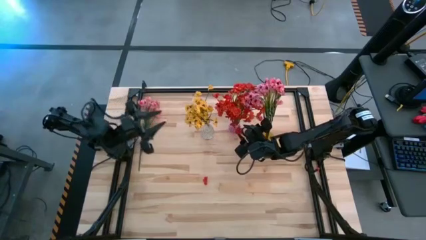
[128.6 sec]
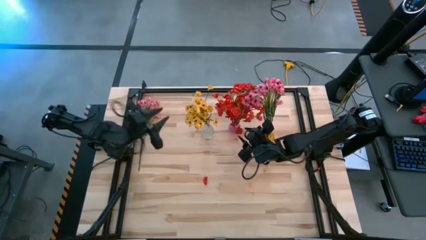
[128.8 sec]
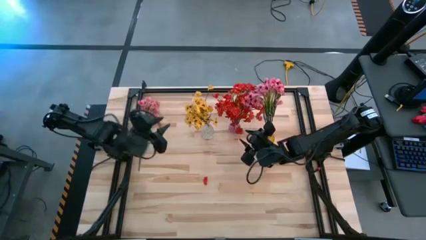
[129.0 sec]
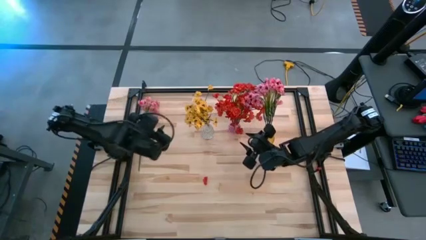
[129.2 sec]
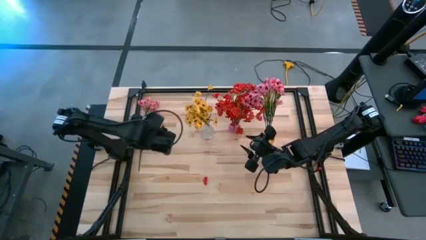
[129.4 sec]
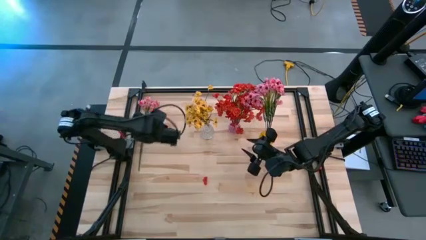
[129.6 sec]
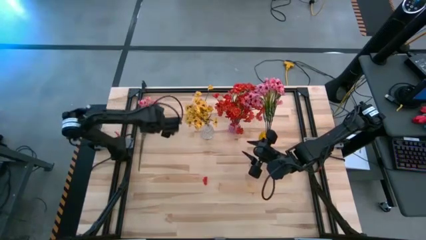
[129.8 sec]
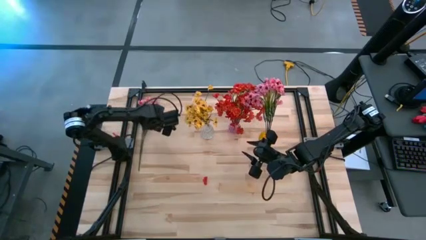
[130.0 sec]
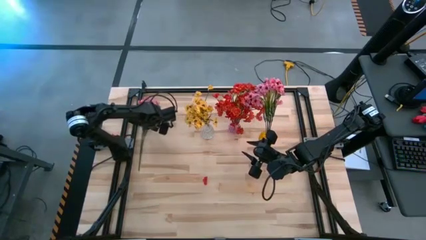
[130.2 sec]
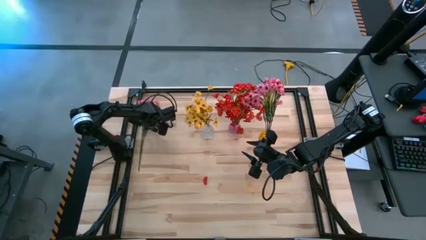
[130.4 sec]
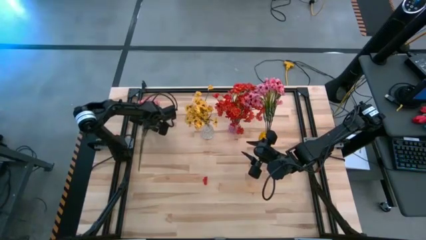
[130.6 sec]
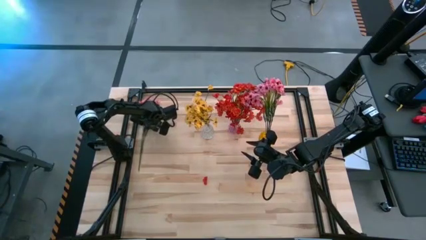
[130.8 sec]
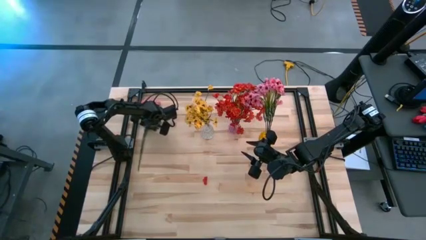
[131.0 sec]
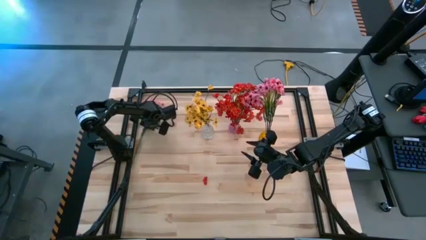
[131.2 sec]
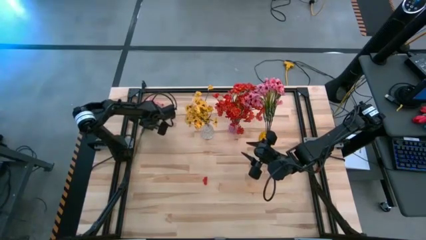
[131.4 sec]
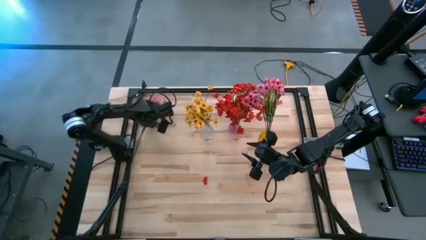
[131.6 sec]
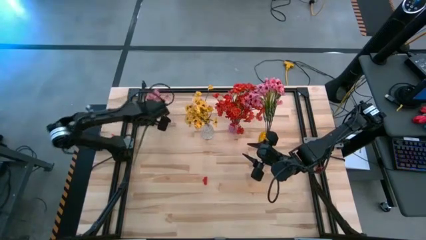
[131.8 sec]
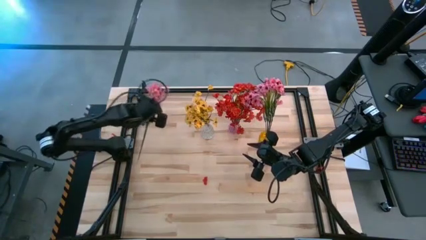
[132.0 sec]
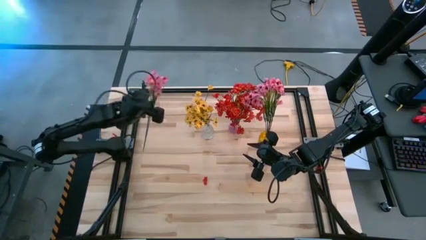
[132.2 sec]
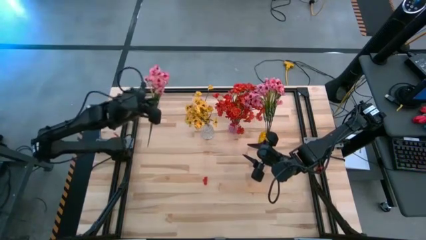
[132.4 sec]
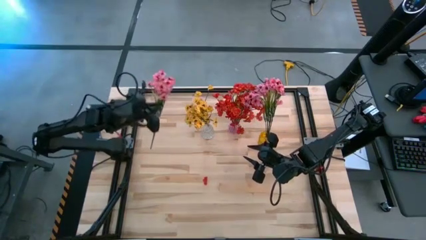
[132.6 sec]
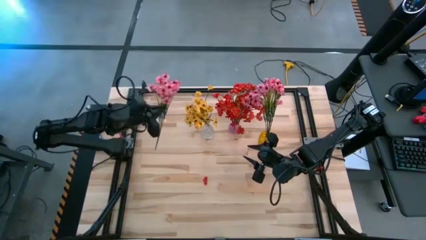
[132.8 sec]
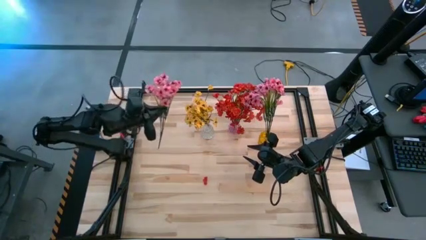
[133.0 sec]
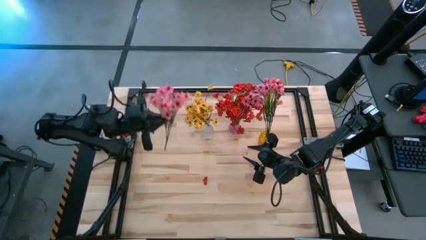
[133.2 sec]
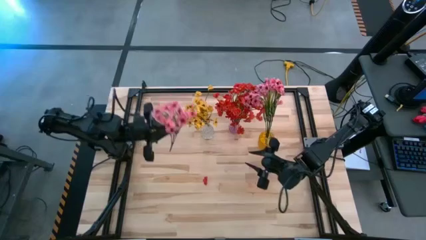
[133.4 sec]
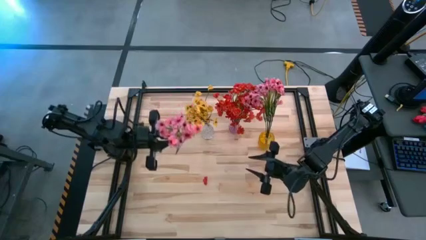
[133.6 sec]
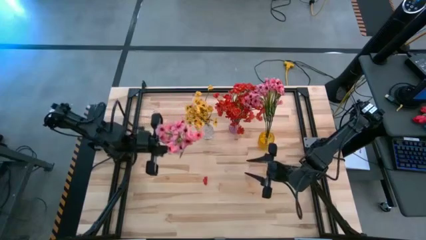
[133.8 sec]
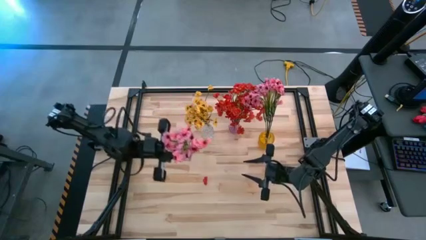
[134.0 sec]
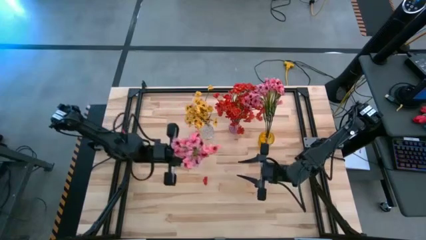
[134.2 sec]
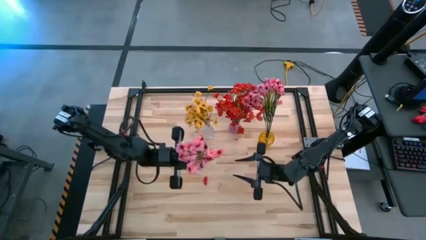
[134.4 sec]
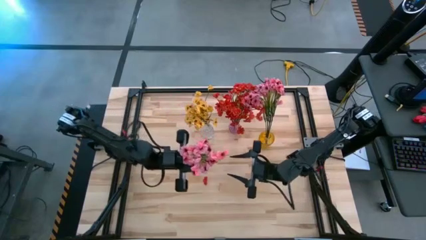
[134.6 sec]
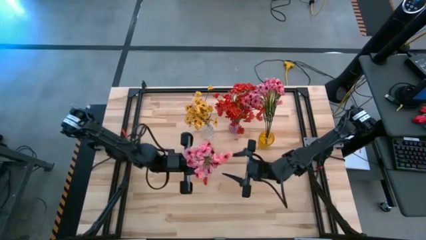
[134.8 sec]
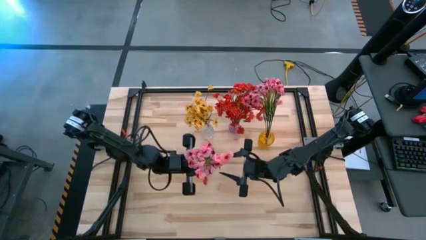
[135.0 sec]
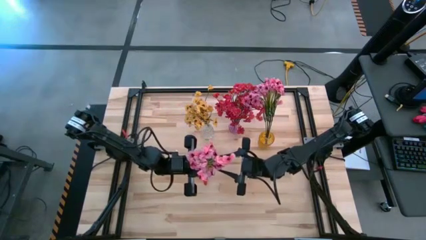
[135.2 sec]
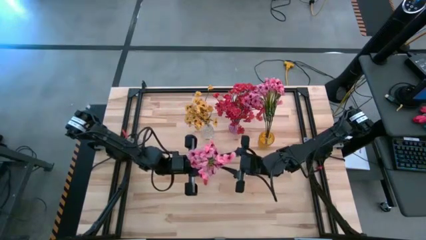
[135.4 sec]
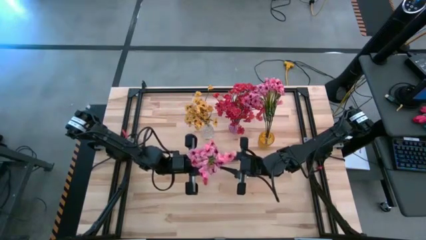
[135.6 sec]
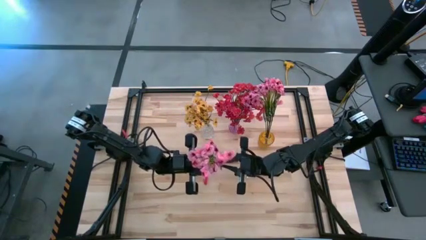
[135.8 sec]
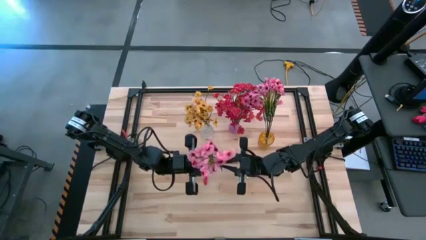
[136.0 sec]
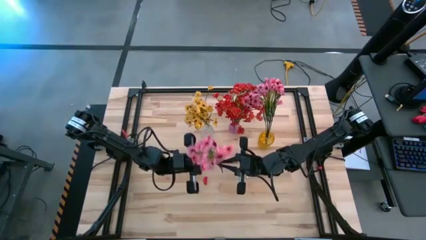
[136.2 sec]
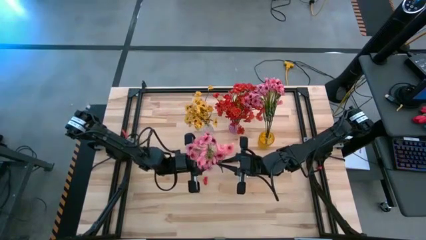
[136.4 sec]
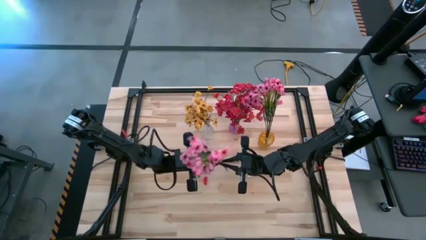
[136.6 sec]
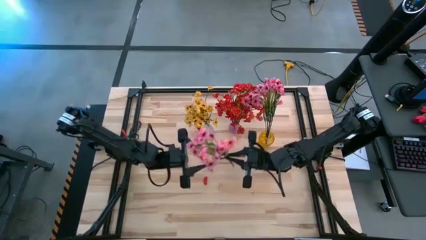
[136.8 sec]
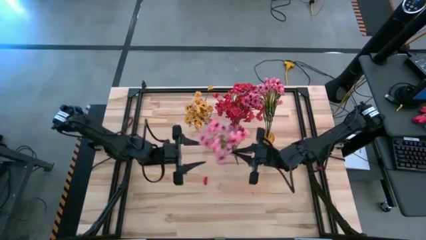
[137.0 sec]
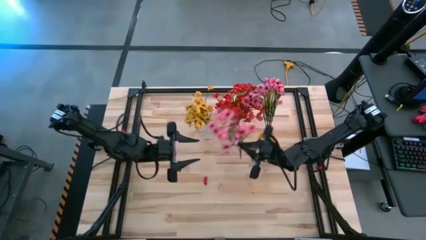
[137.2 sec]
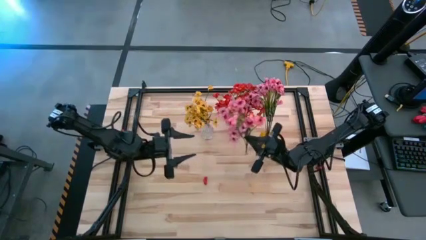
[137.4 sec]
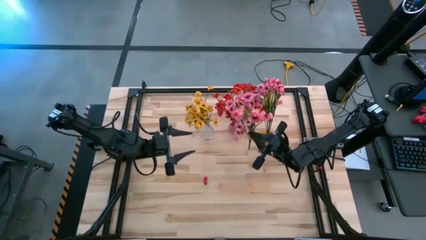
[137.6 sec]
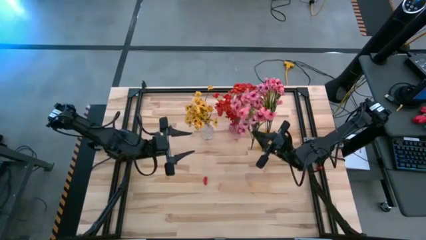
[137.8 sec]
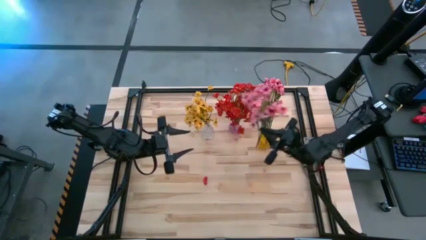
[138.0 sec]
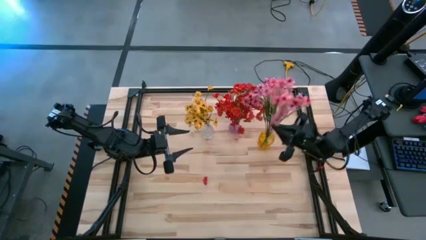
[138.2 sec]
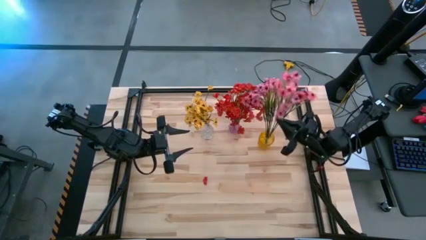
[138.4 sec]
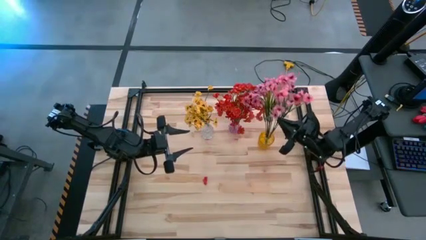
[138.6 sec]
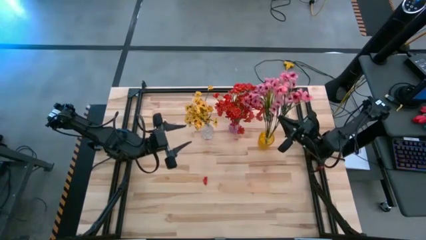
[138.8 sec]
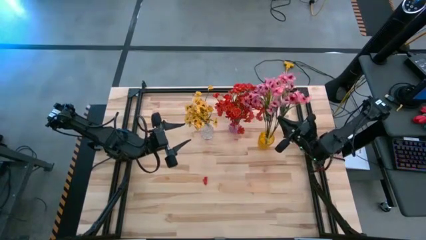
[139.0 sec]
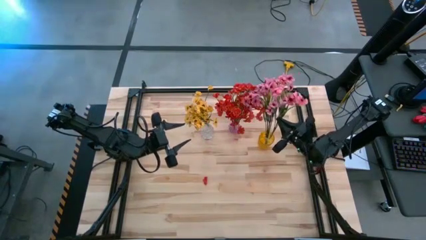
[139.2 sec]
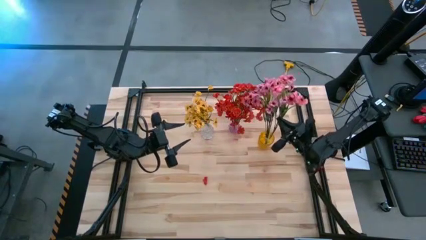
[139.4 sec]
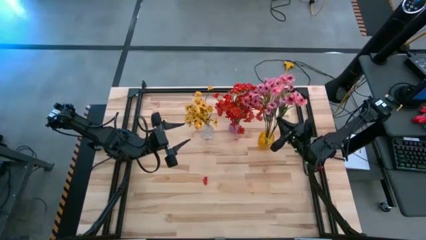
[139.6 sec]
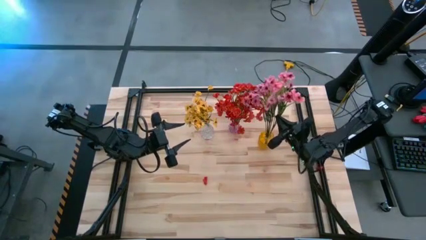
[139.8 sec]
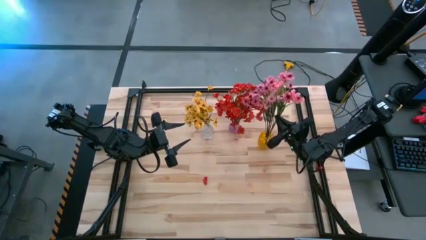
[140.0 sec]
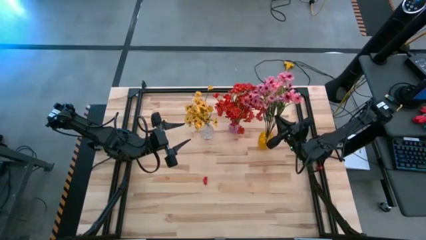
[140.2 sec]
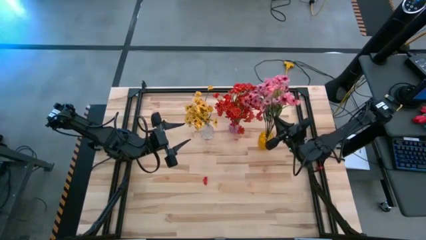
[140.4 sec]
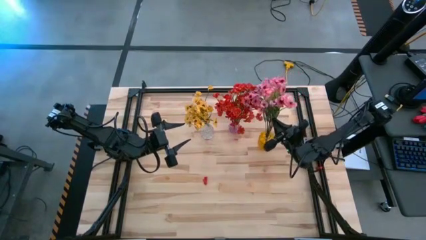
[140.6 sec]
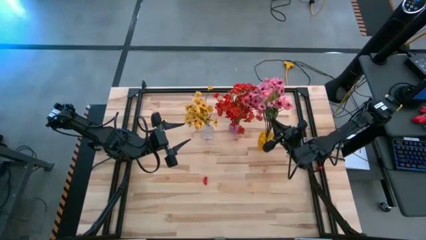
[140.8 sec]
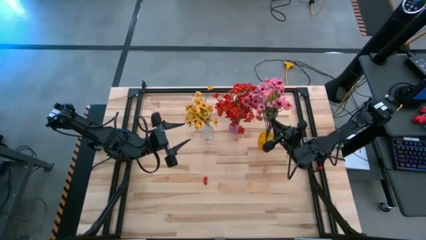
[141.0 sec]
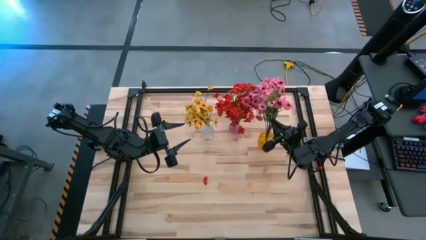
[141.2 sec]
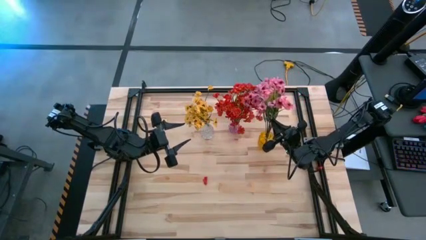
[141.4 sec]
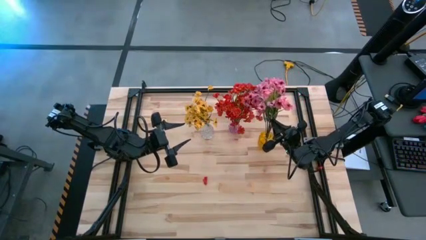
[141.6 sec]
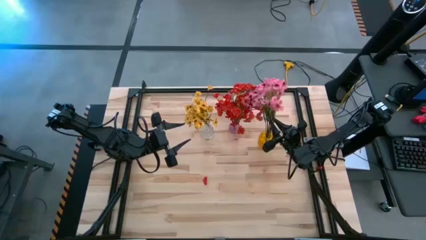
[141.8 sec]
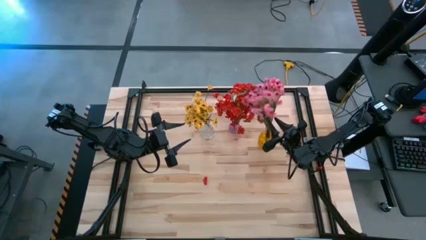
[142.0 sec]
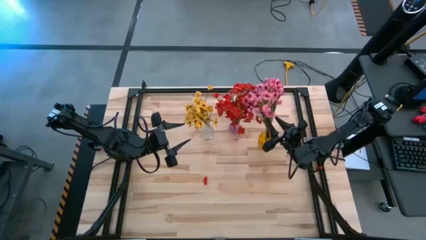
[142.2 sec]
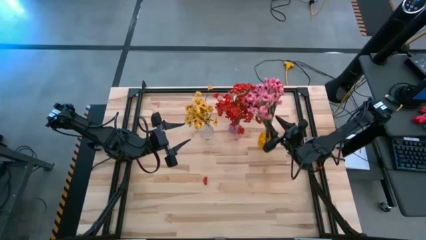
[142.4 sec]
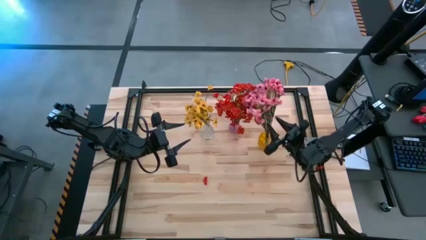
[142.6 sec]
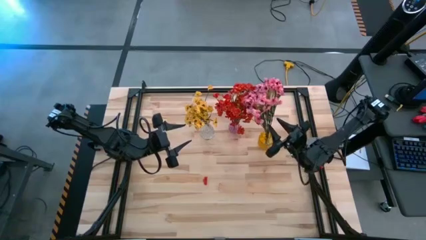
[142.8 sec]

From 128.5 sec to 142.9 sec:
Task: Sort flowers into vase by color
Put the pink flowers into the yellow vase

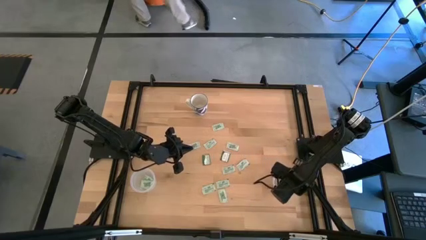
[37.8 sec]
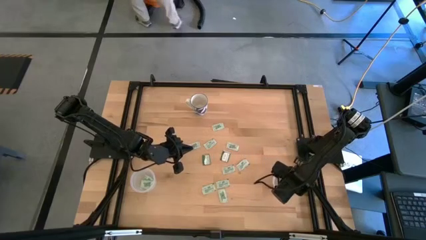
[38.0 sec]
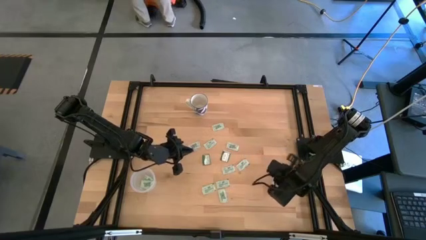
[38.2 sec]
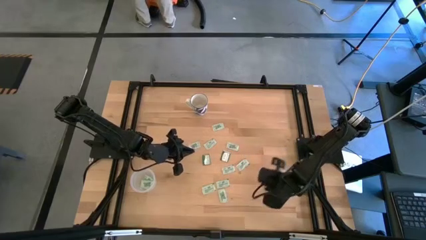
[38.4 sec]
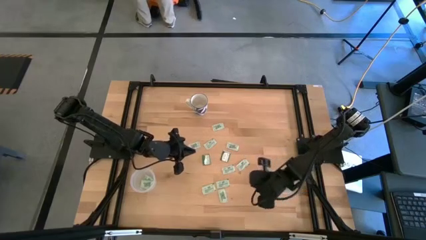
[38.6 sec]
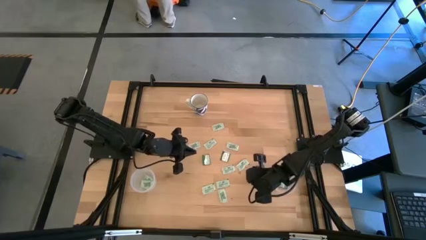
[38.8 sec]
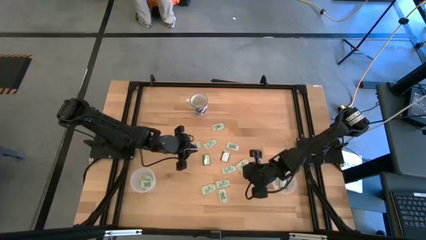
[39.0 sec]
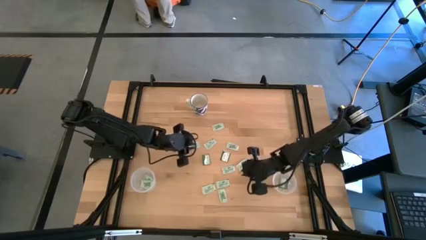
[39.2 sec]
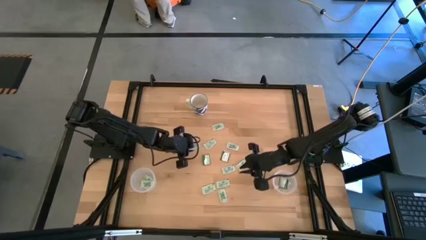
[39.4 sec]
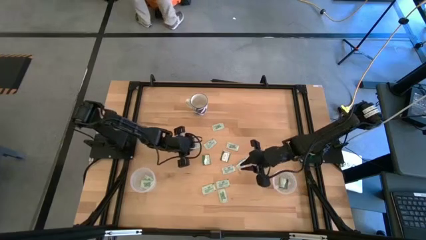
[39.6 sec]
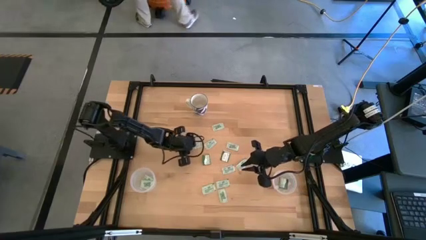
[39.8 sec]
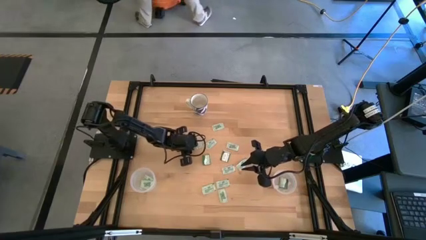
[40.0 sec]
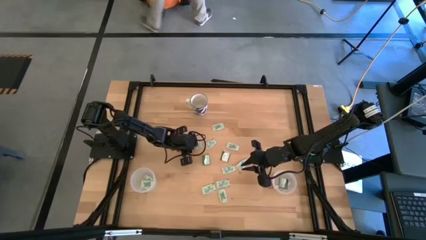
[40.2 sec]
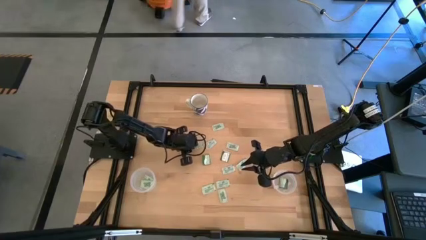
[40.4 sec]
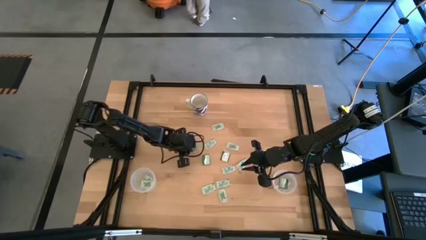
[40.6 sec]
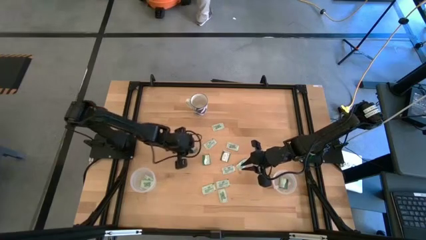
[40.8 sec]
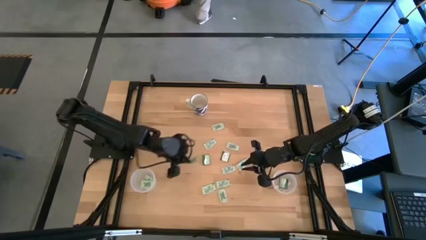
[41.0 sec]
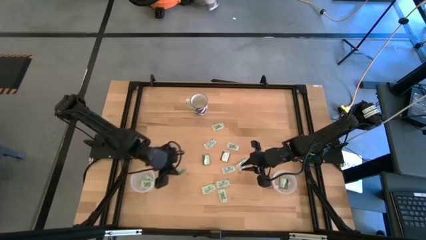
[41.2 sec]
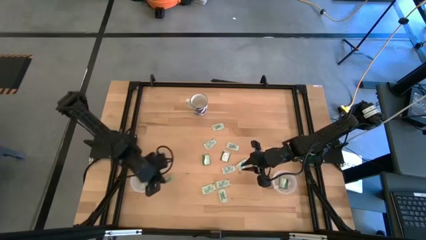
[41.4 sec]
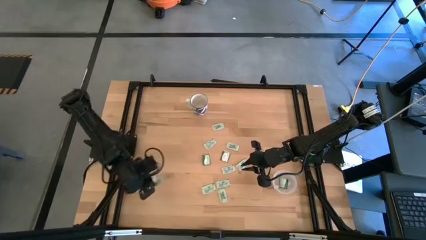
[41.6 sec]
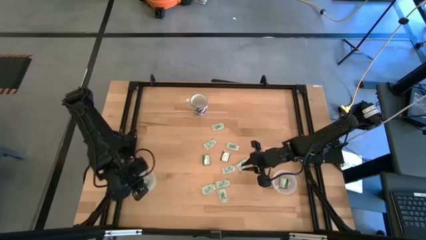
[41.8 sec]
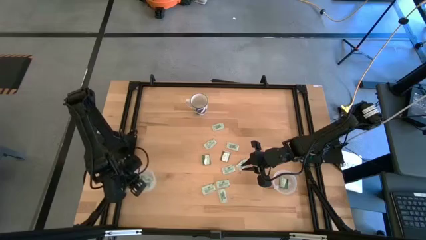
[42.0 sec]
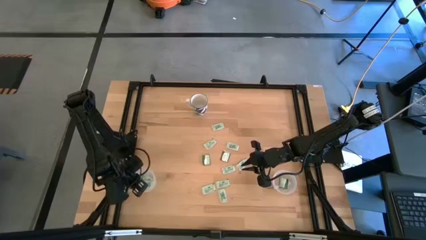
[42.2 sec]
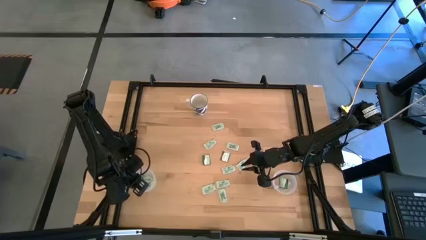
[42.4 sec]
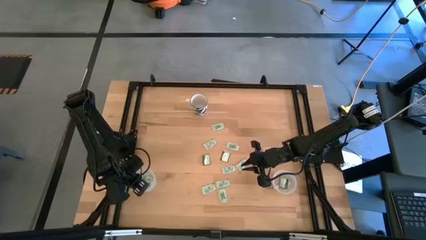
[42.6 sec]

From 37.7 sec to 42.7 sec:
Task: Pick and place Stevia / Truvia into bins
Put the light green stevia packet into the left transparent container
